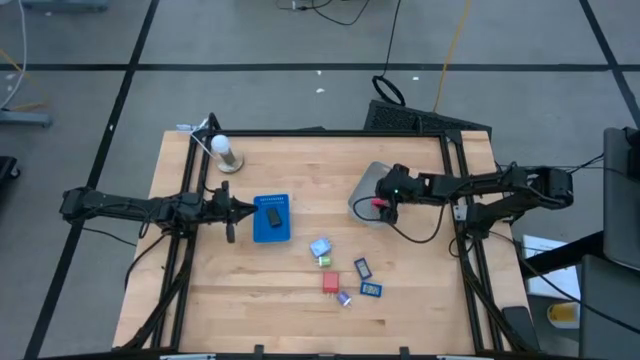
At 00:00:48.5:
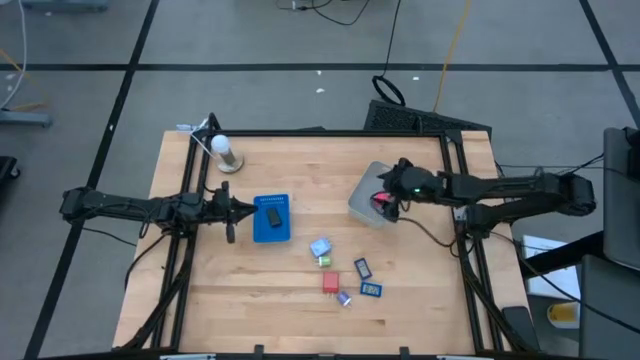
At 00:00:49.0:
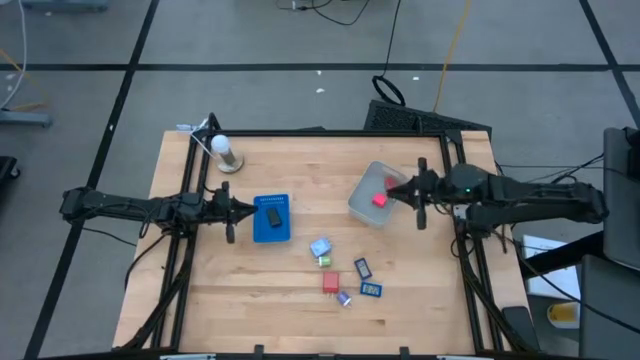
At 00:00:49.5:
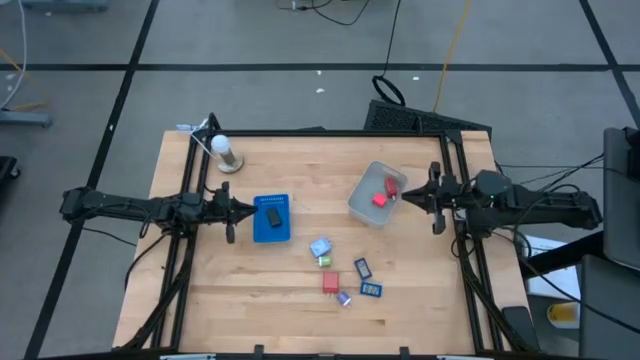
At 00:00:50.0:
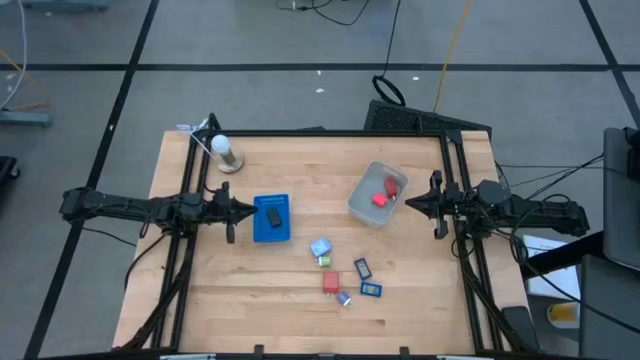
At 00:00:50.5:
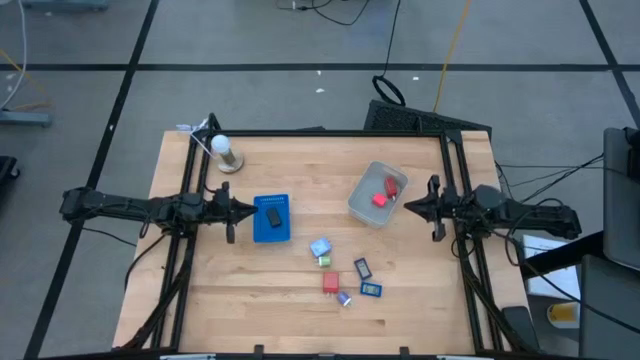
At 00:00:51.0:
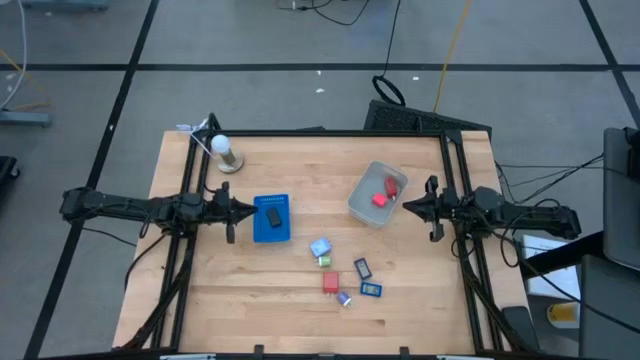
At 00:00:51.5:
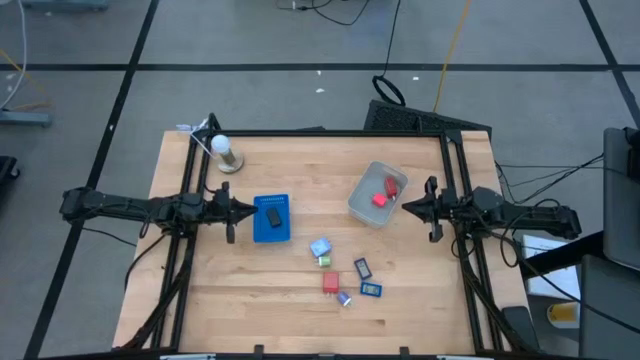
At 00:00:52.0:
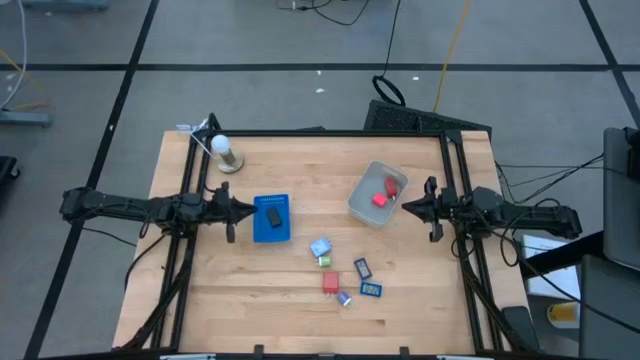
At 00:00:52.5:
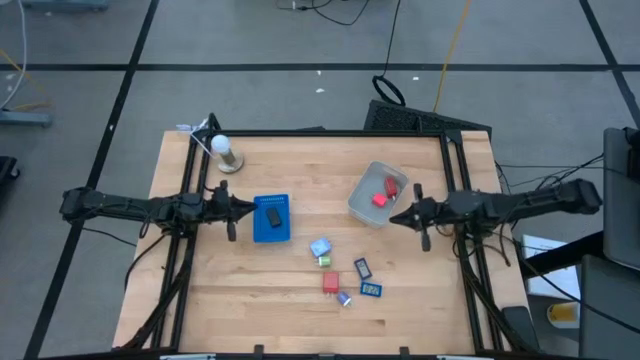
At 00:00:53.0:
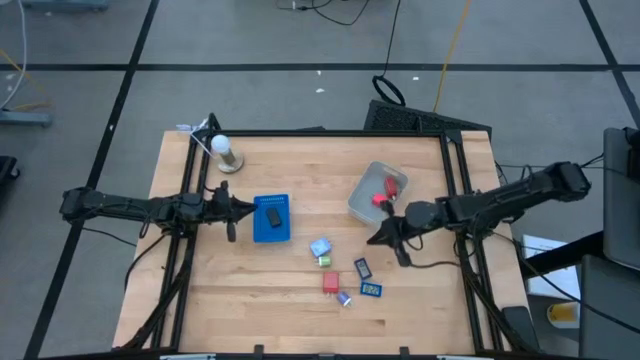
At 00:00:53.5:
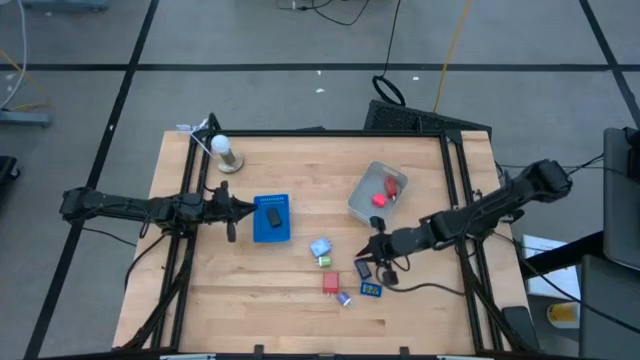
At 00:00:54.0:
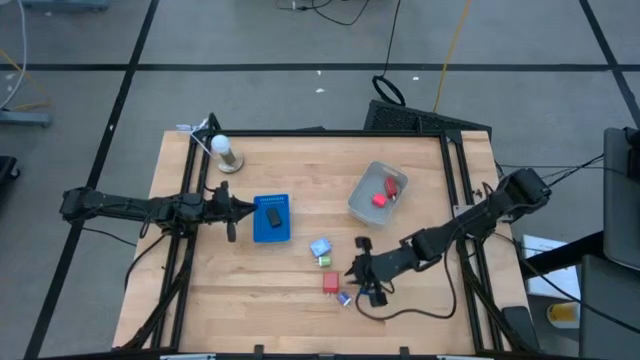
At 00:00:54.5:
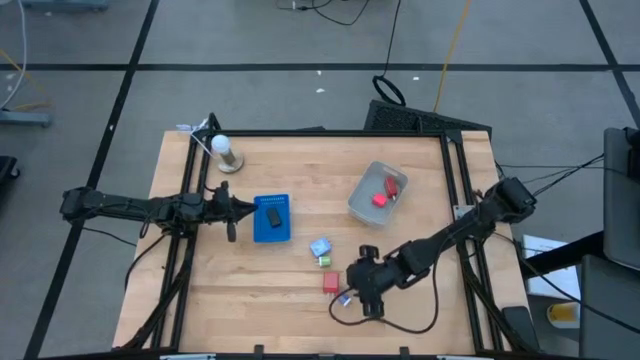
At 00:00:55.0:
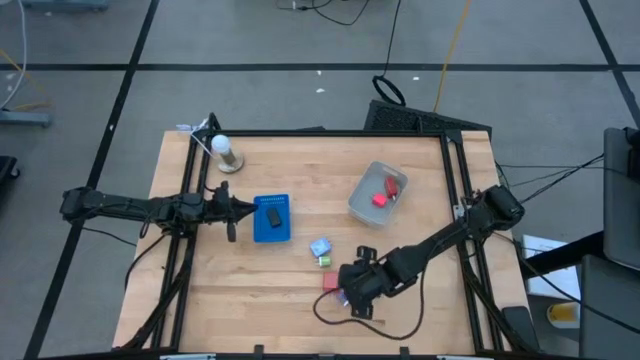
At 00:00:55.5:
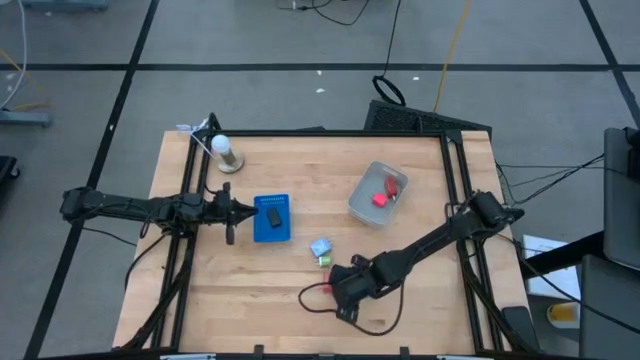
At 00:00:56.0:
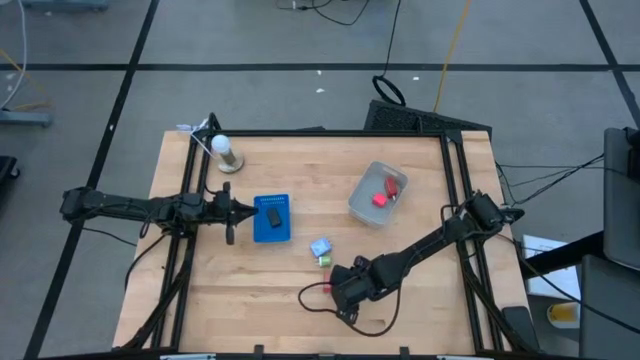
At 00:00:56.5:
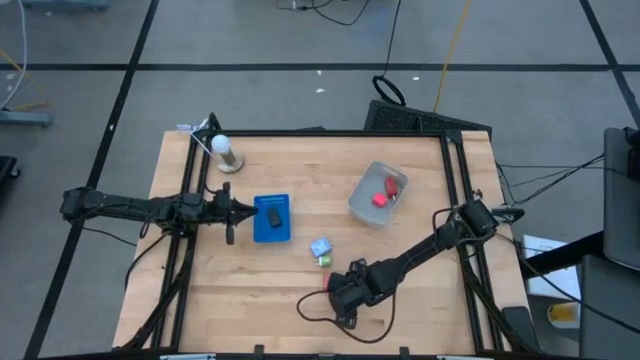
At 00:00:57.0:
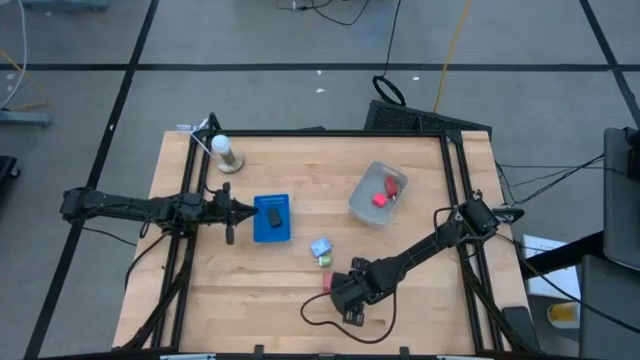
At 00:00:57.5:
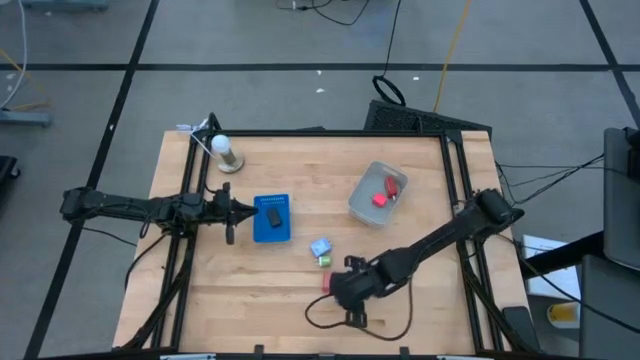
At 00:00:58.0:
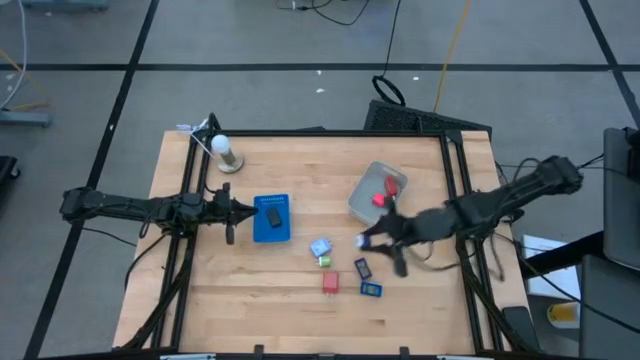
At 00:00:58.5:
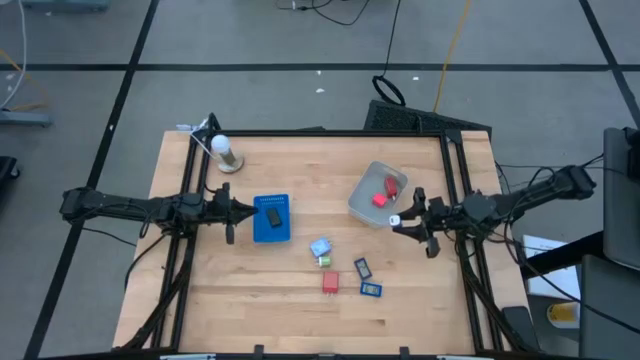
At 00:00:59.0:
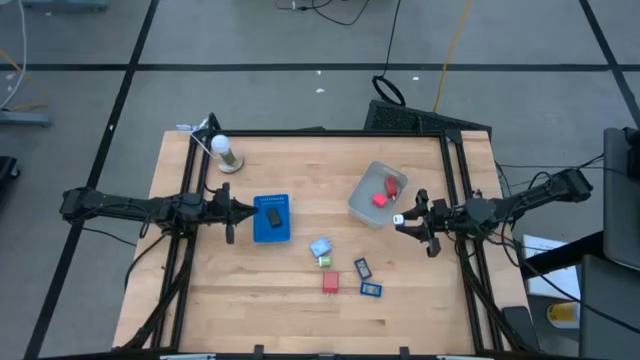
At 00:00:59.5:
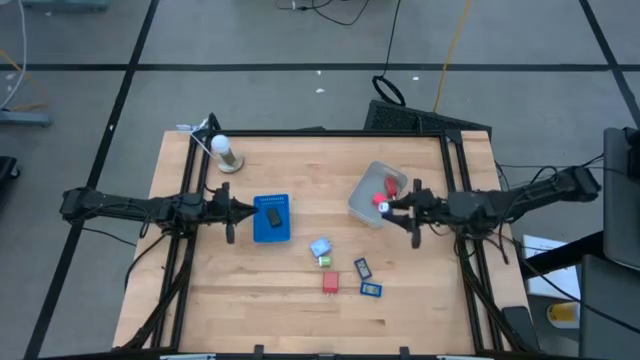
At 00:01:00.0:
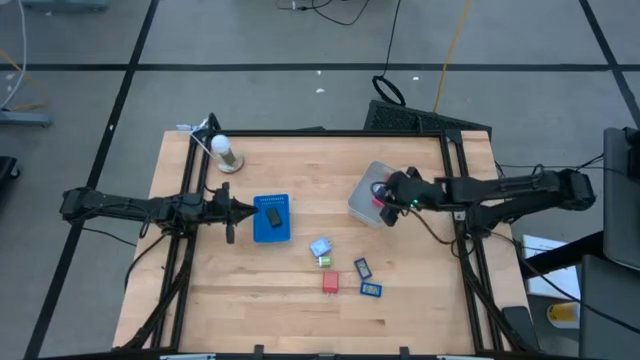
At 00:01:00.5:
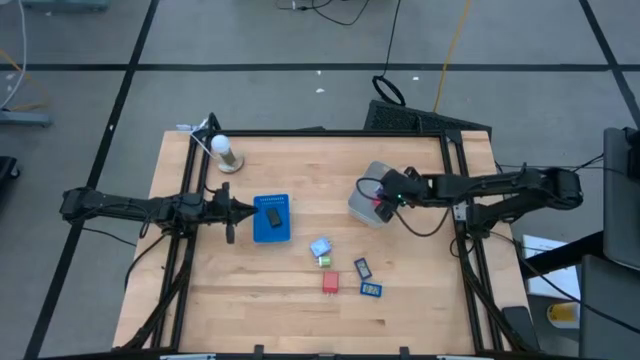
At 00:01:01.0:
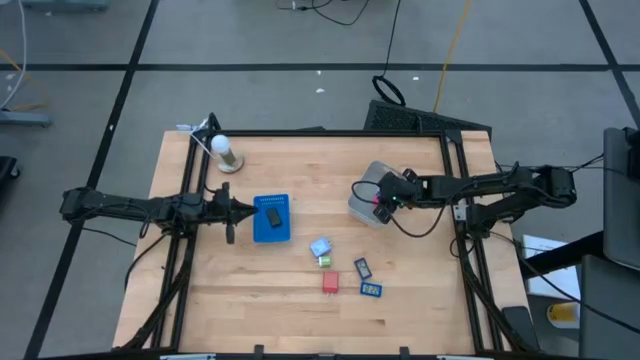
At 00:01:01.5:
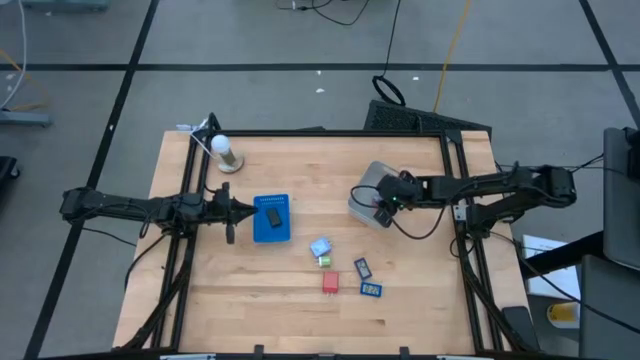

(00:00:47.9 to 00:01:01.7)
Task: Pick & Place Office items
Put the purple charger adapter into the gray bin

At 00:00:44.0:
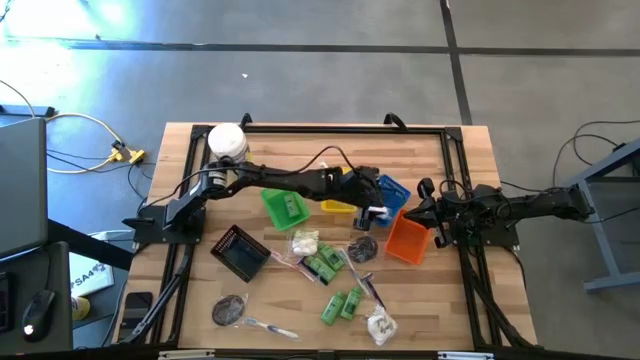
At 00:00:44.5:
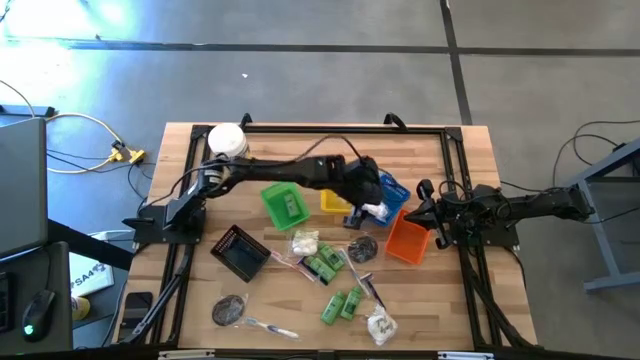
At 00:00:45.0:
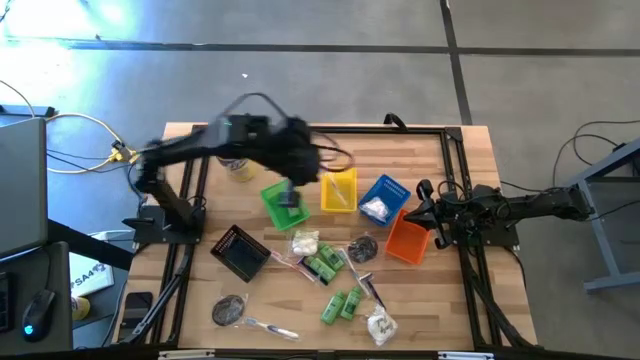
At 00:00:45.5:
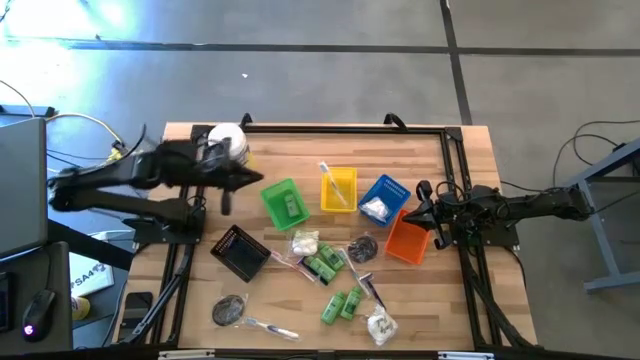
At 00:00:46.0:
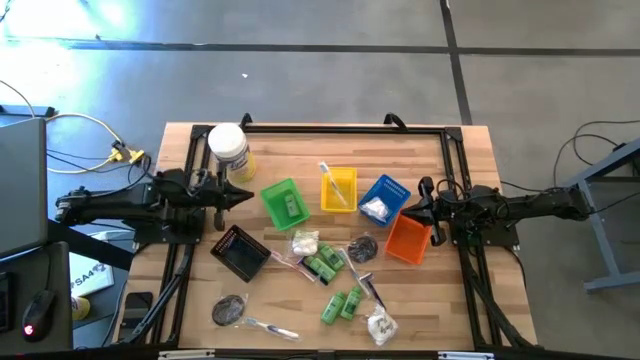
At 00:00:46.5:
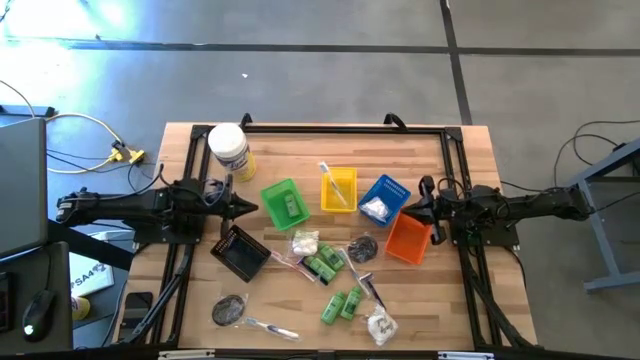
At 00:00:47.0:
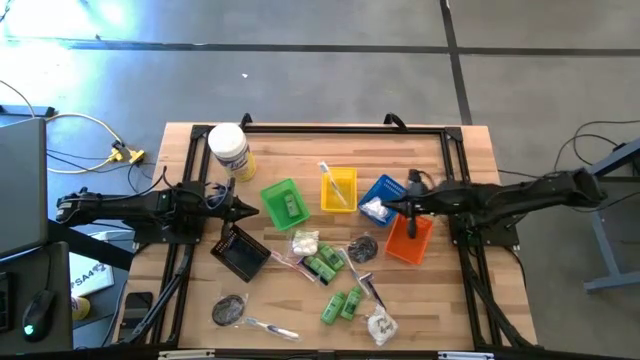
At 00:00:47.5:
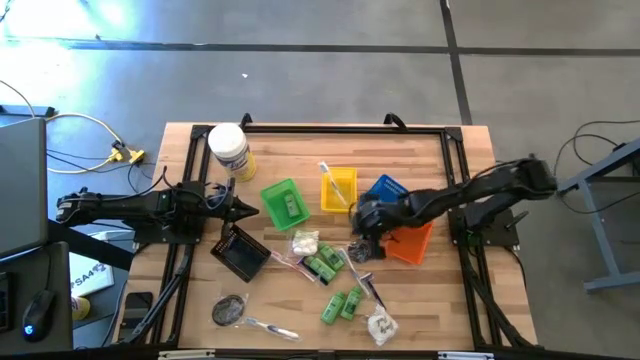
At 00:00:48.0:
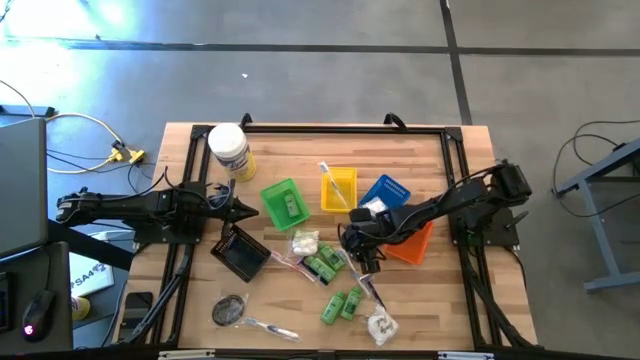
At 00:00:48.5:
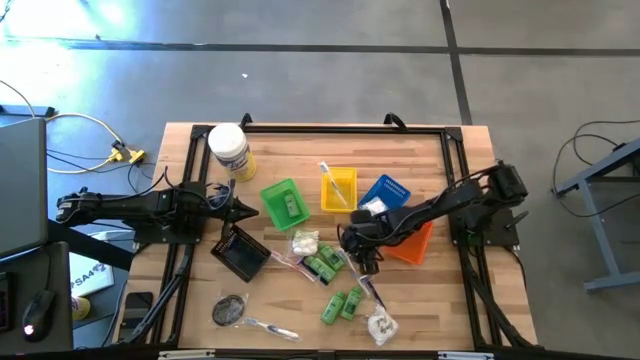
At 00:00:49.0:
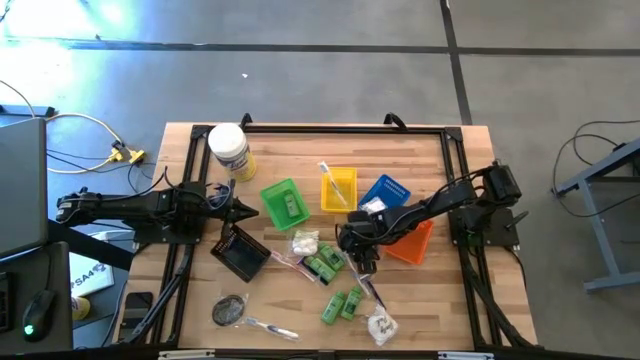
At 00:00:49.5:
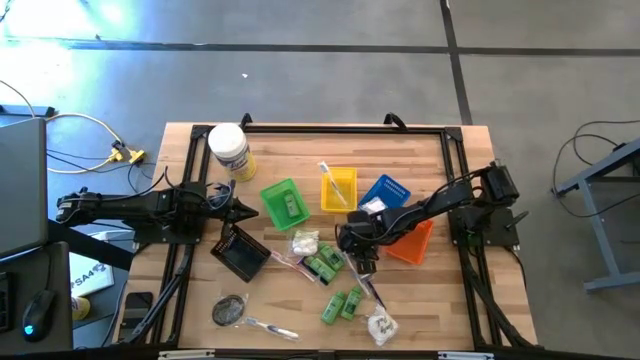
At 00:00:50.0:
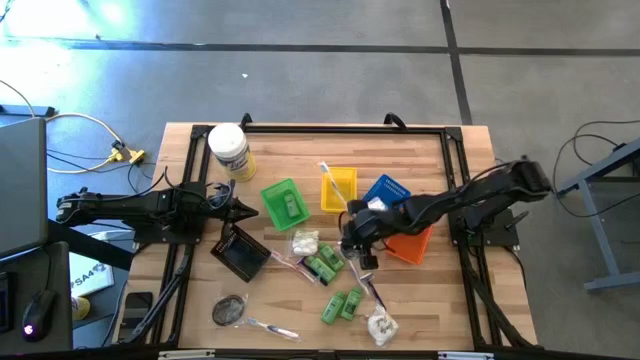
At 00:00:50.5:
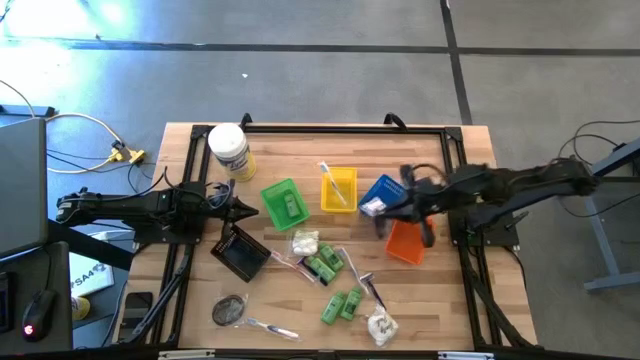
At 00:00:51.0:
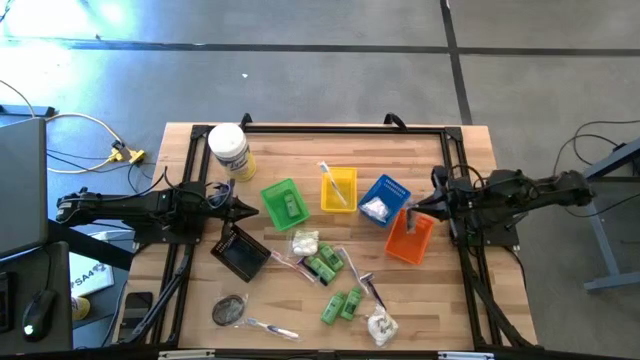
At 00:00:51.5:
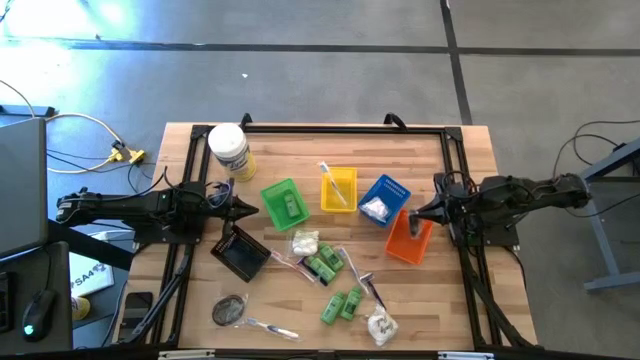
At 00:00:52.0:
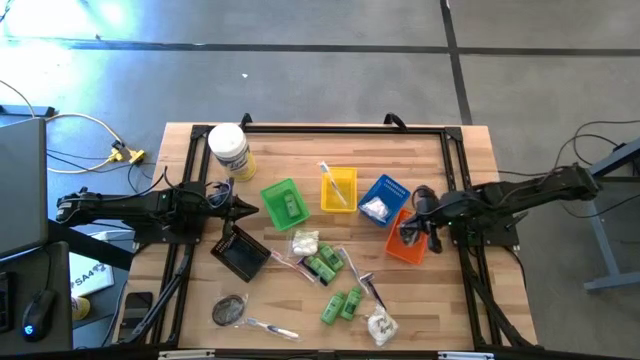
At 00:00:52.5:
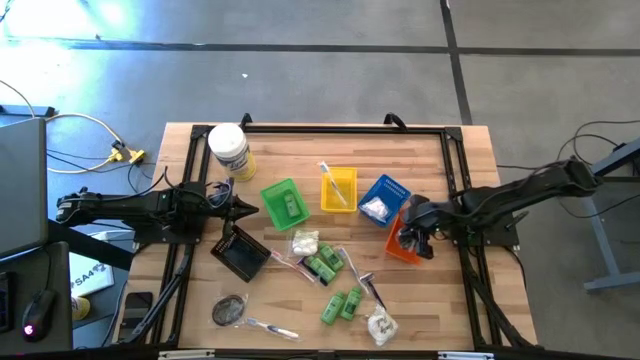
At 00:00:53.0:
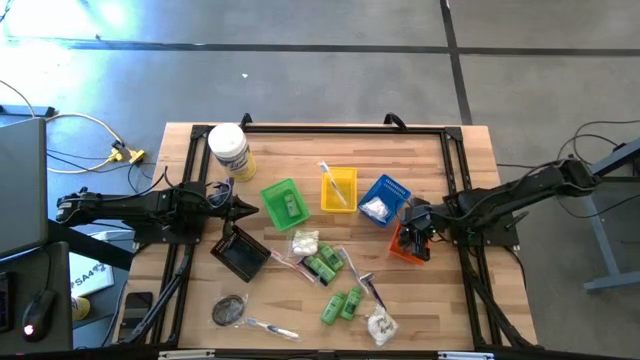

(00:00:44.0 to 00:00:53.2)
Task: Pick & Place Travel size toiletries
Put the right hairbrush into the orange bin
